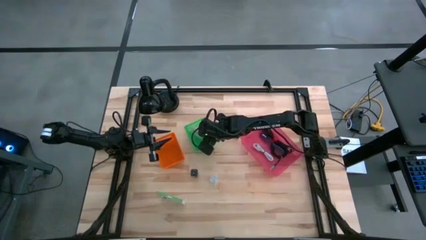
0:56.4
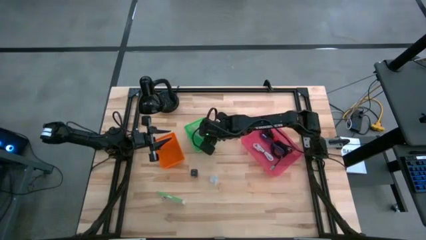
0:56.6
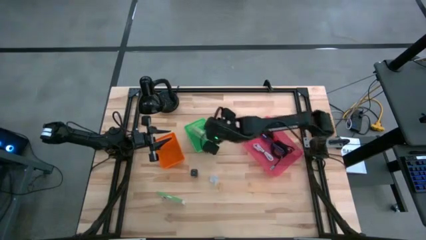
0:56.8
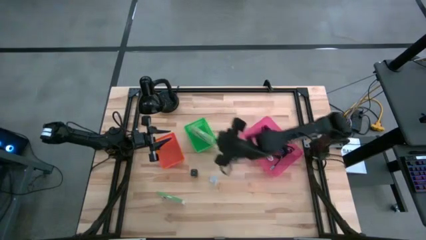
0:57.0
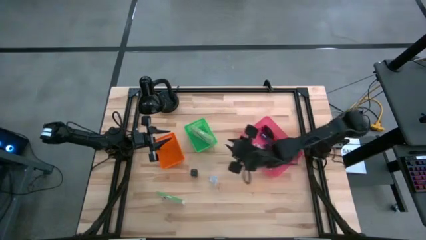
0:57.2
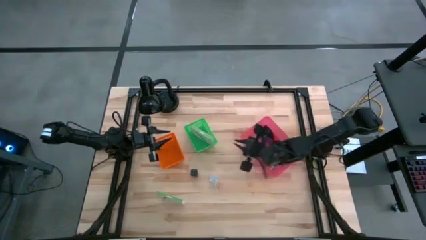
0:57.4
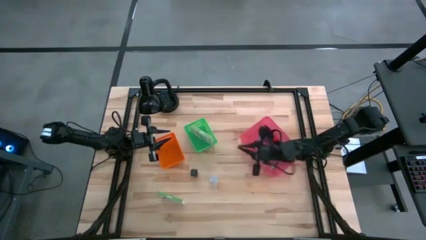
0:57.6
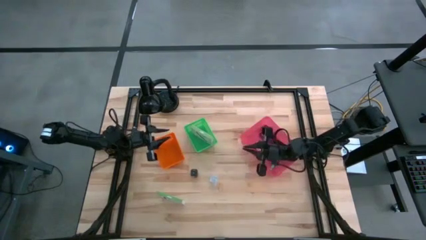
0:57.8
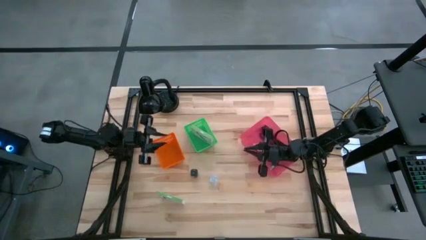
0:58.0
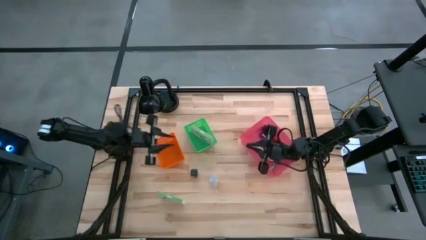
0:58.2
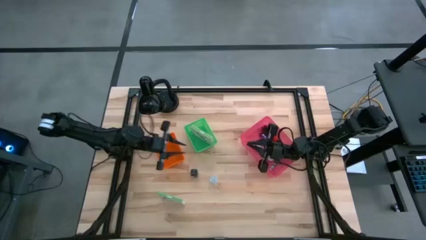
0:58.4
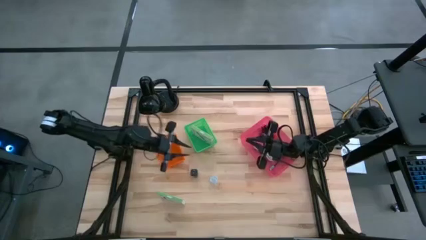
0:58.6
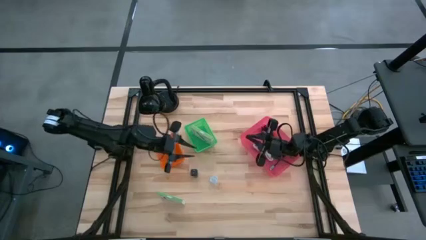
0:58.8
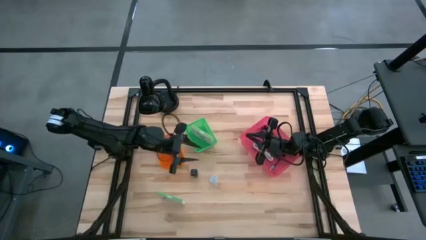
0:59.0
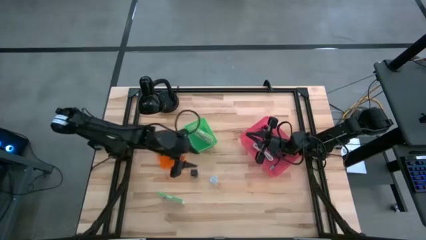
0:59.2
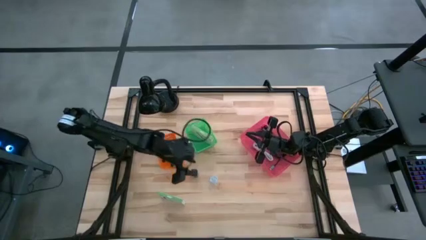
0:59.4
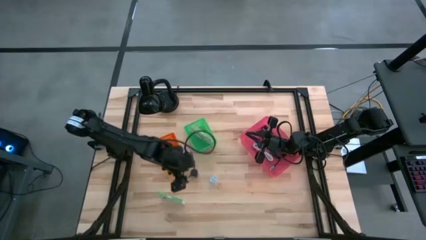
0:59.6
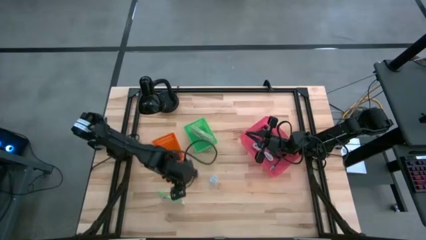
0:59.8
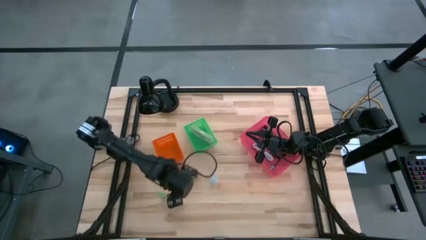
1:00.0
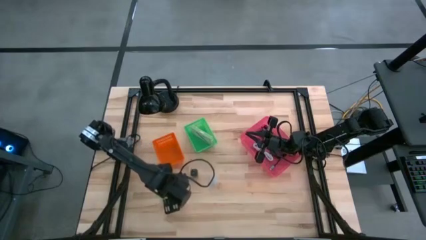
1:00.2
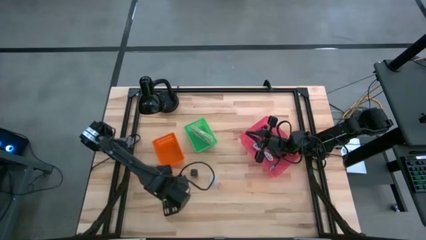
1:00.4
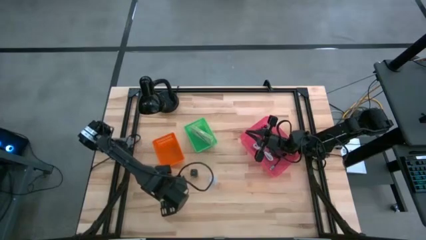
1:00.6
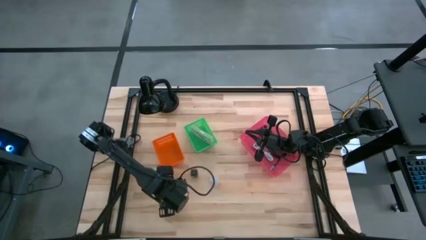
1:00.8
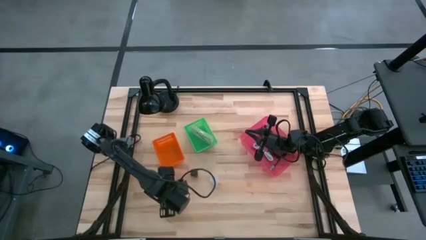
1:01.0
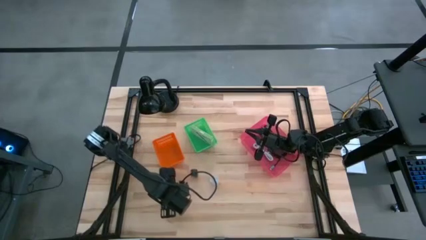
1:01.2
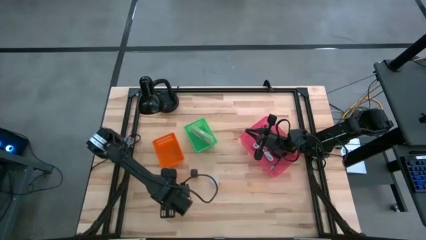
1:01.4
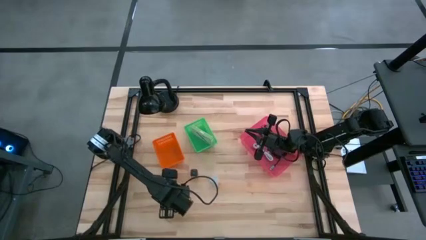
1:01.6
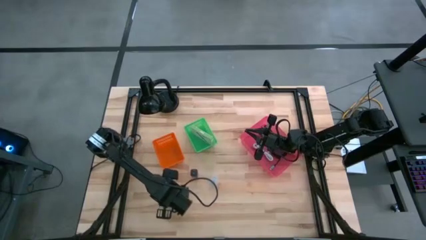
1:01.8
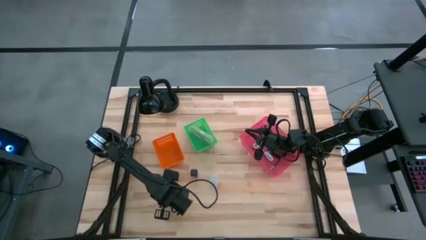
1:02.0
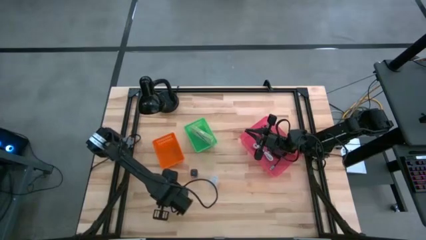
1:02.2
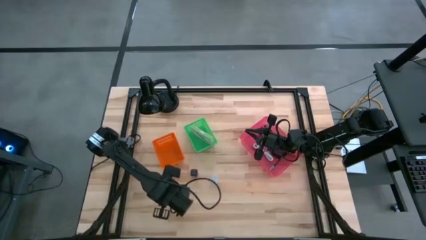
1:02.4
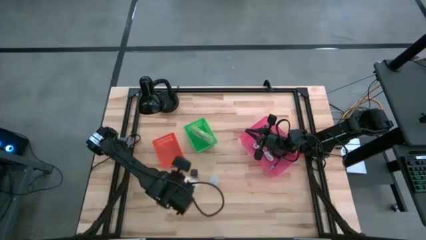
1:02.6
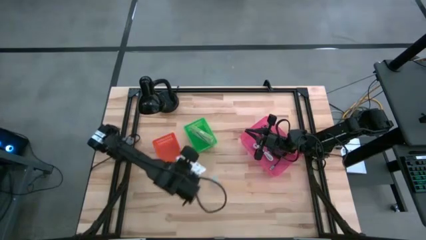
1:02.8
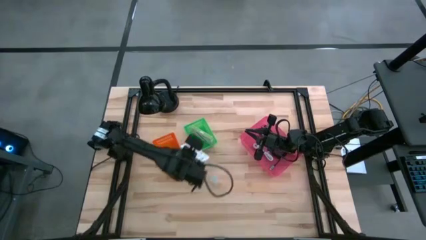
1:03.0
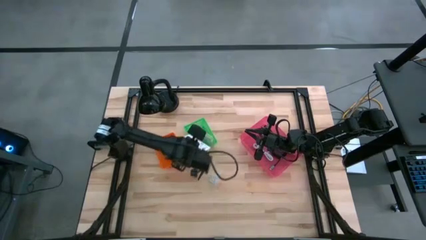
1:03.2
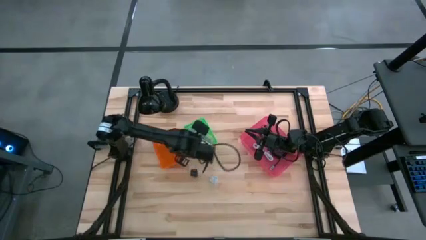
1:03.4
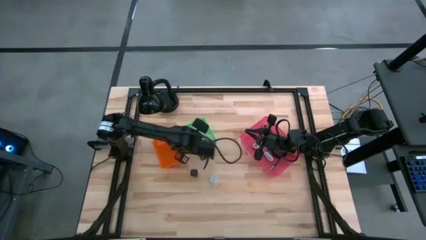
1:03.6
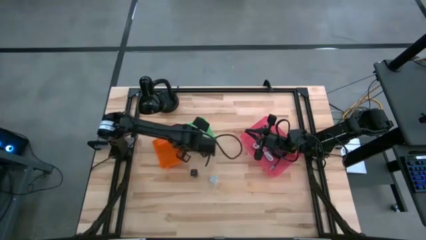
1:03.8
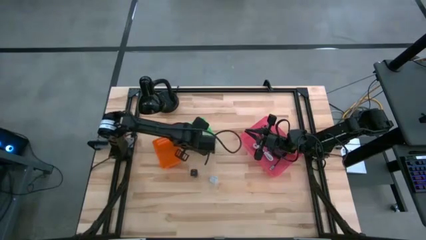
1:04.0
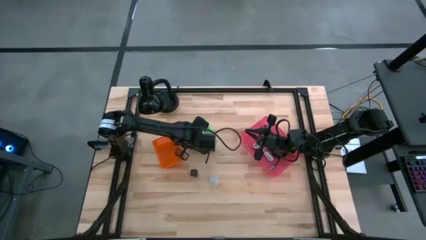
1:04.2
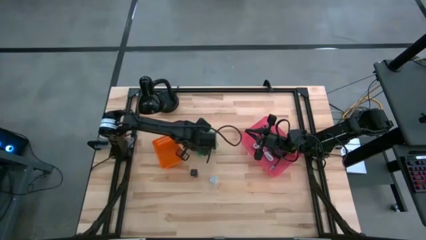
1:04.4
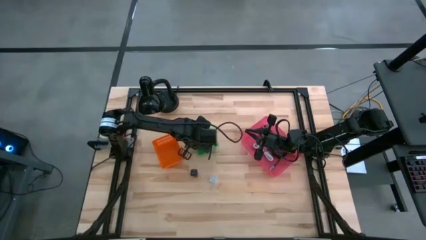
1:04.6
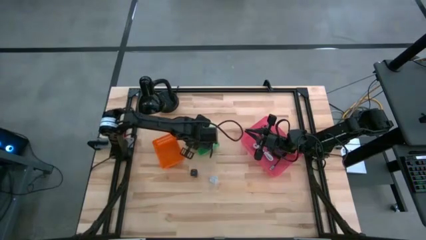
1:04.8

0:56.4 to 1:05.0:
Task: Pick and place items into bin
Put the card reader box into the green bin

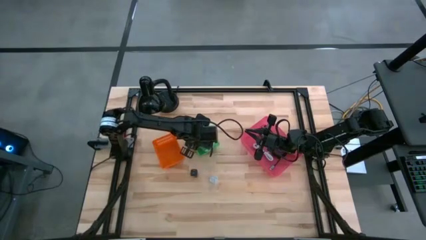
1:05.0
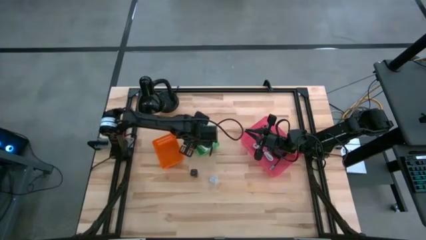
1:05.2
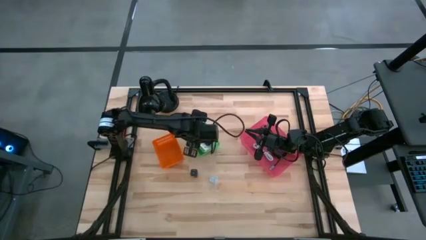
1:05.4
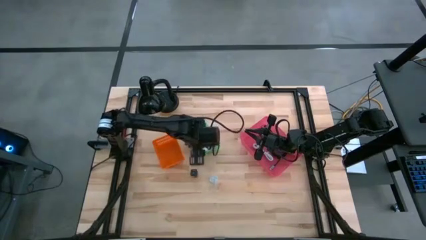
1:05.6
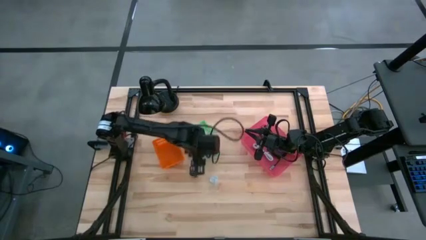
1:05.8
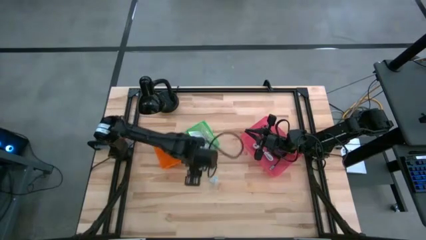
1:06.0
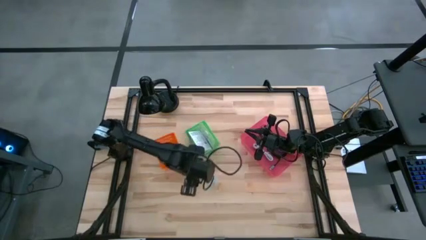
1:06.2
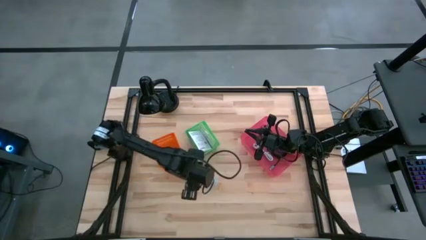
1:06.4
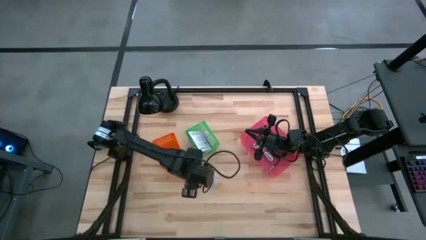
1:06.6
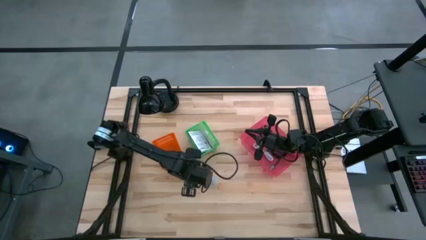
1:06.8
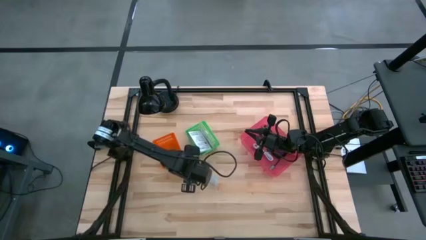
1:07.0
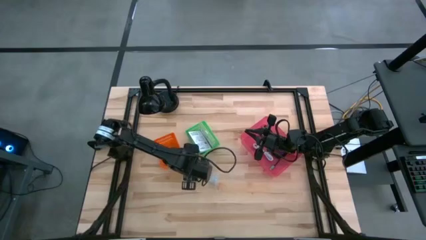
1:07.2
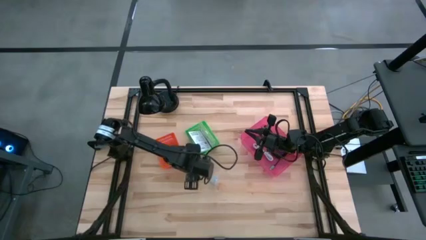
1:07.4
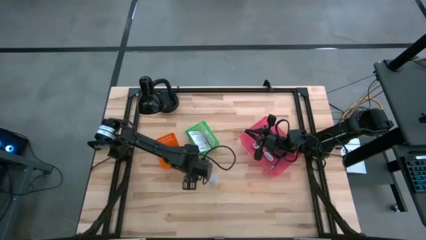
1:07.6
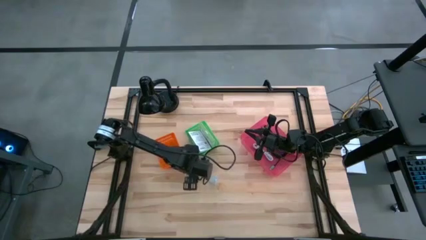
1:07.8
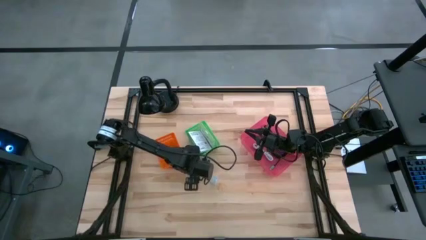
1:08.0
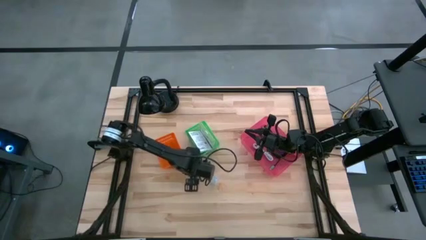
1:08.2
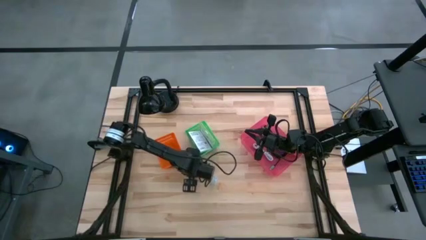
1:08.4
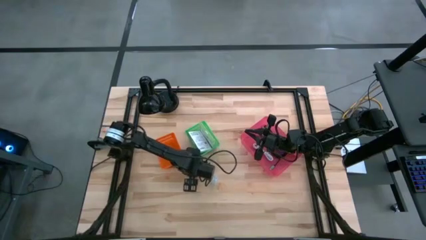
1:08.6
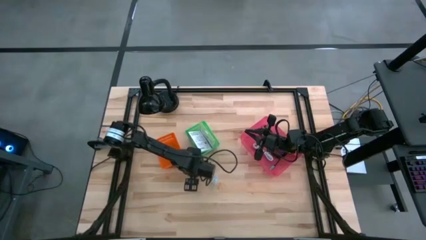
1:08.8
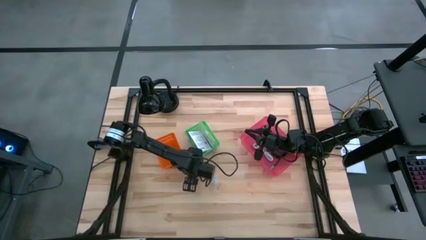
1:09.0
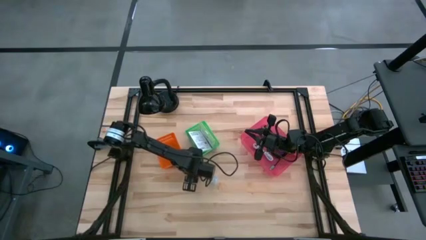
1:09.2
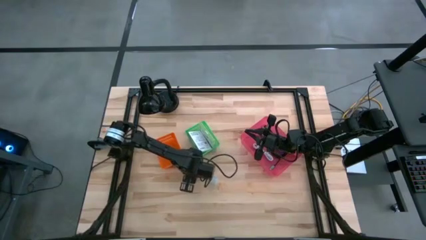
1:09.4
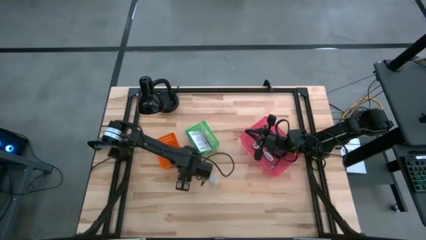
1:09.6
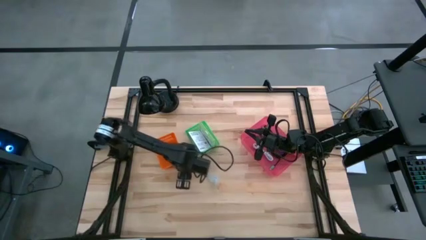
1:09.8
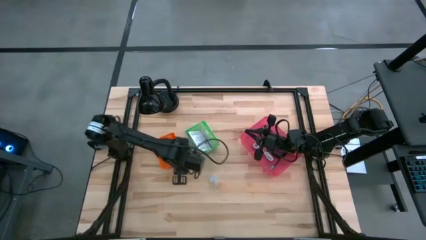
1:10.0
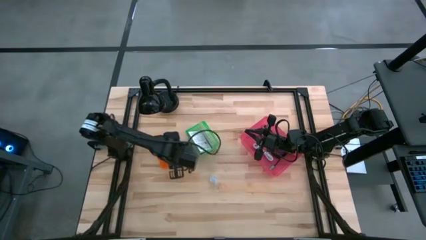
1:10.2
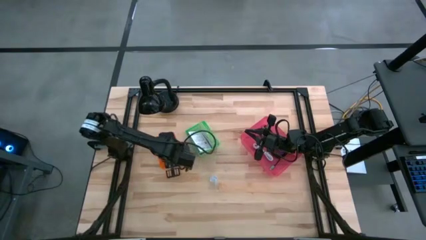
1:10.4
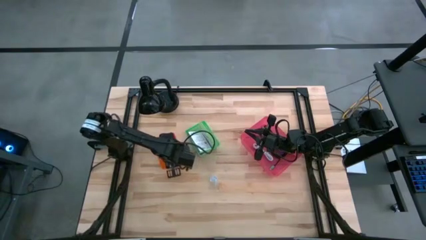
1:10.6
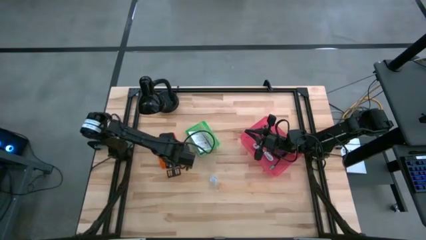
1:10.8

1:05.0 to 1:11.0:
Put the black charger adapter into the orange bin
